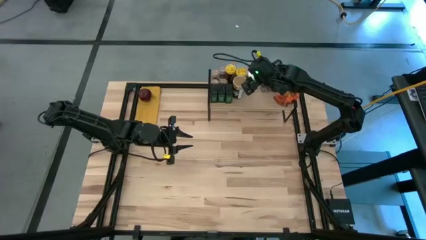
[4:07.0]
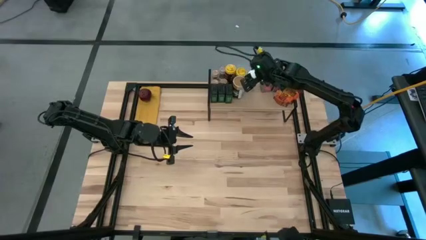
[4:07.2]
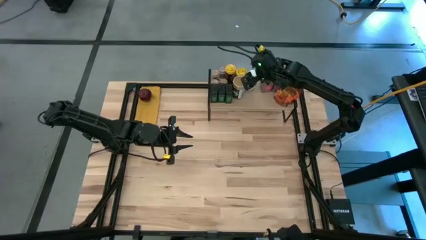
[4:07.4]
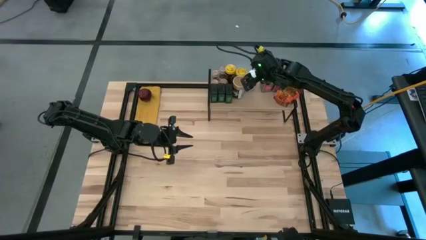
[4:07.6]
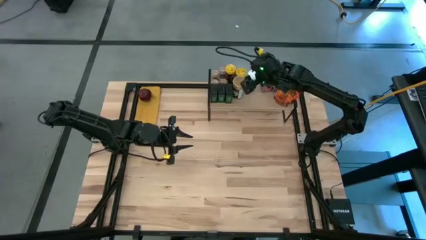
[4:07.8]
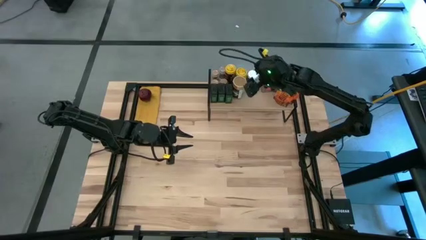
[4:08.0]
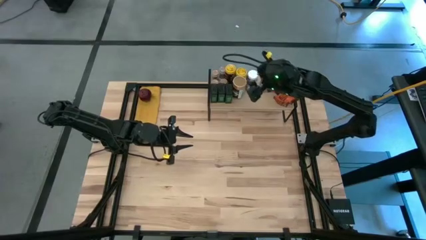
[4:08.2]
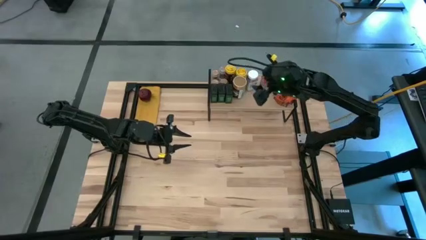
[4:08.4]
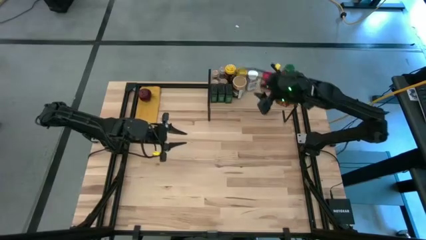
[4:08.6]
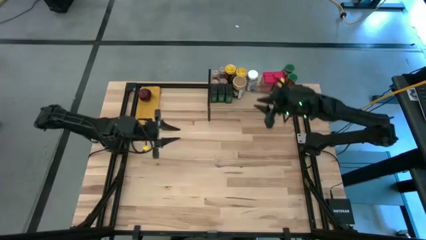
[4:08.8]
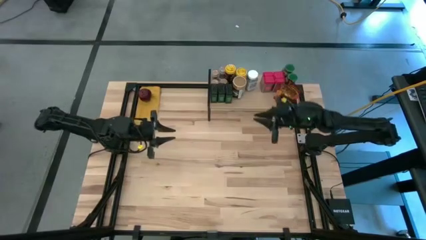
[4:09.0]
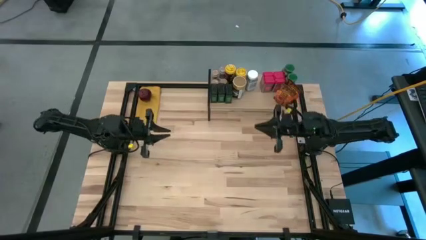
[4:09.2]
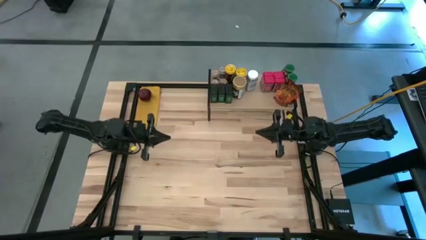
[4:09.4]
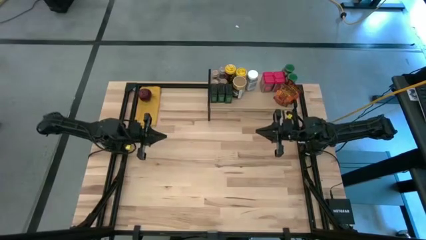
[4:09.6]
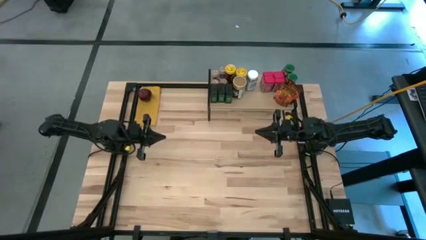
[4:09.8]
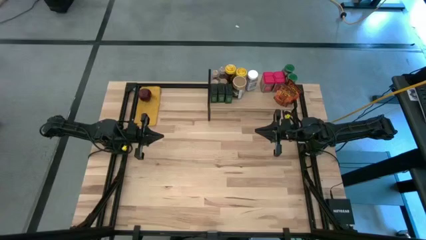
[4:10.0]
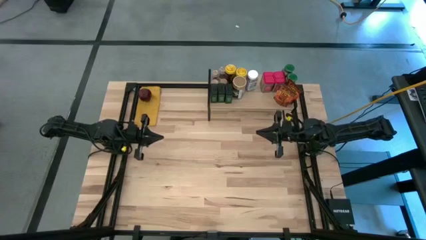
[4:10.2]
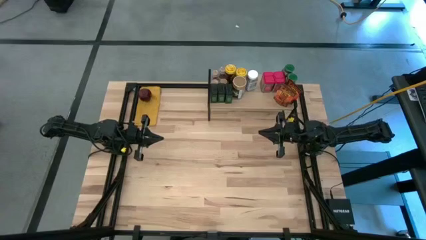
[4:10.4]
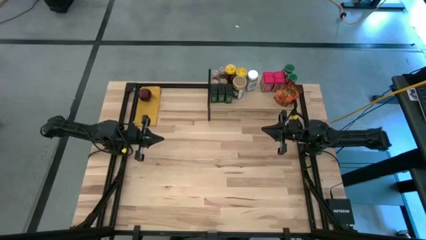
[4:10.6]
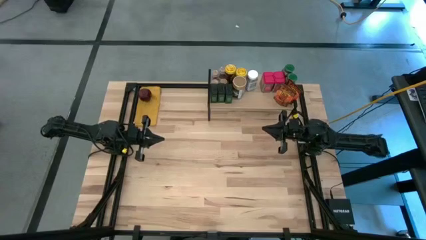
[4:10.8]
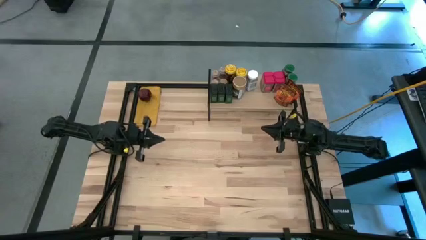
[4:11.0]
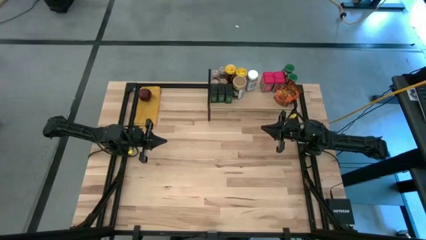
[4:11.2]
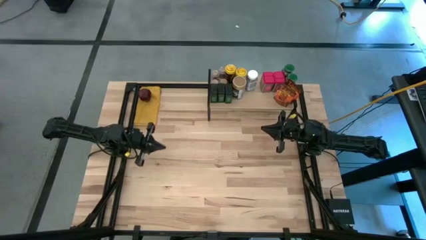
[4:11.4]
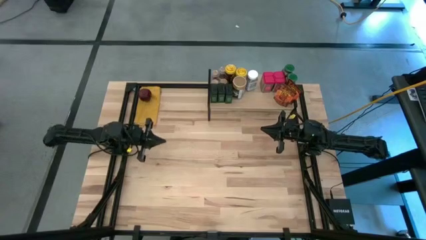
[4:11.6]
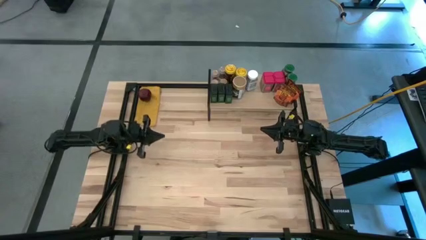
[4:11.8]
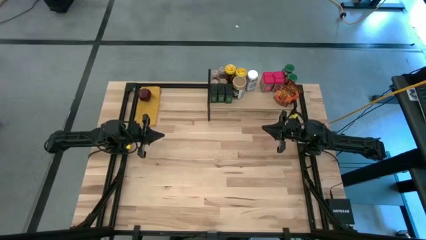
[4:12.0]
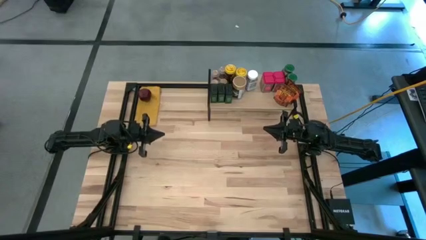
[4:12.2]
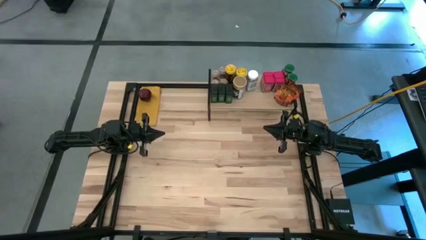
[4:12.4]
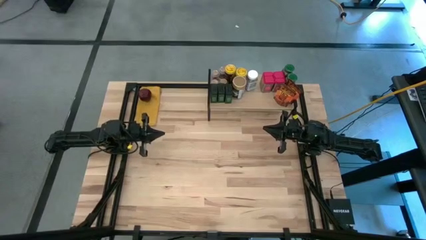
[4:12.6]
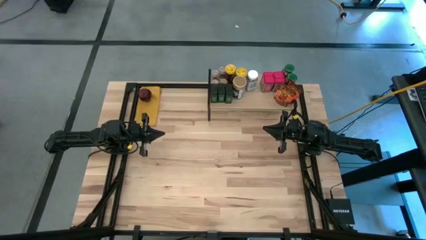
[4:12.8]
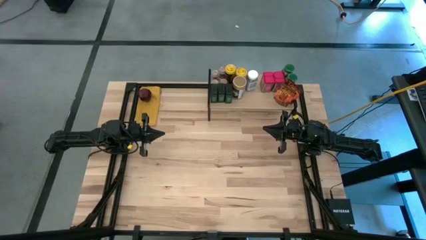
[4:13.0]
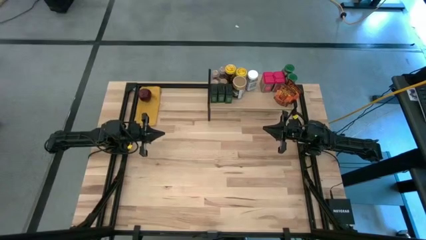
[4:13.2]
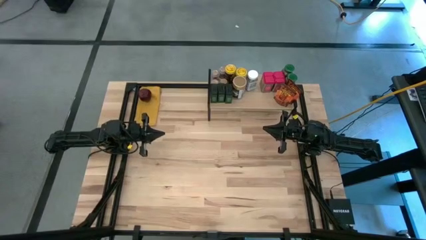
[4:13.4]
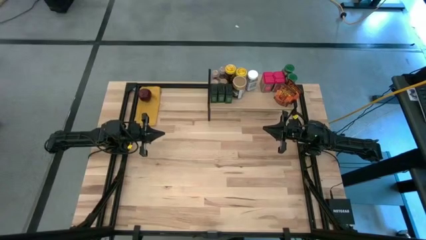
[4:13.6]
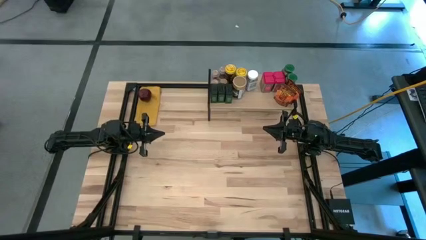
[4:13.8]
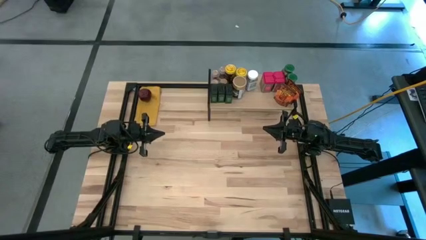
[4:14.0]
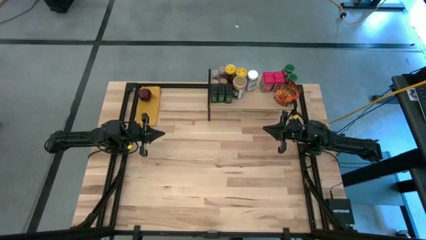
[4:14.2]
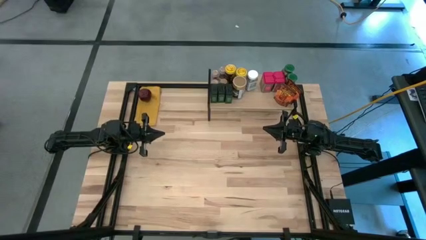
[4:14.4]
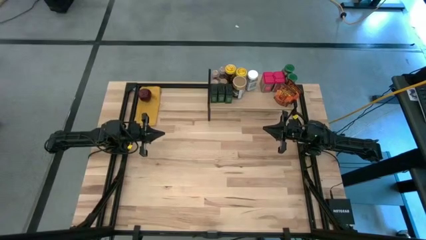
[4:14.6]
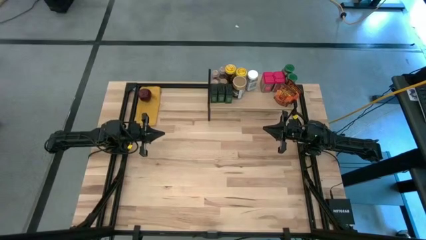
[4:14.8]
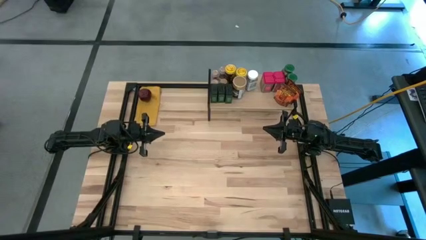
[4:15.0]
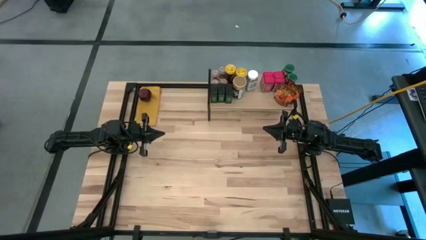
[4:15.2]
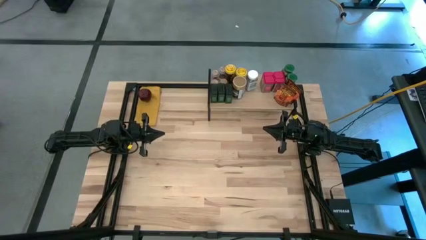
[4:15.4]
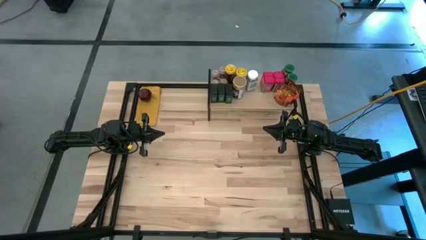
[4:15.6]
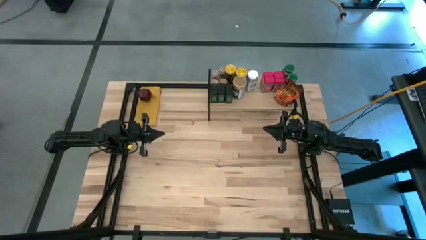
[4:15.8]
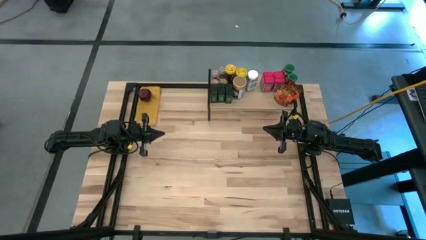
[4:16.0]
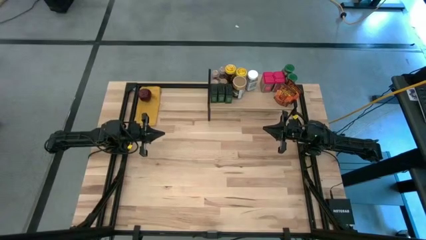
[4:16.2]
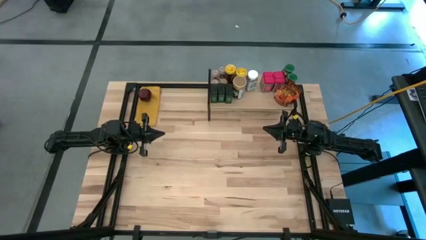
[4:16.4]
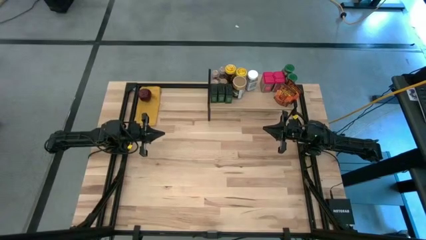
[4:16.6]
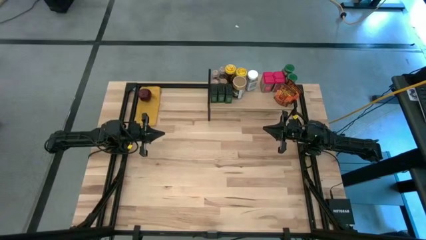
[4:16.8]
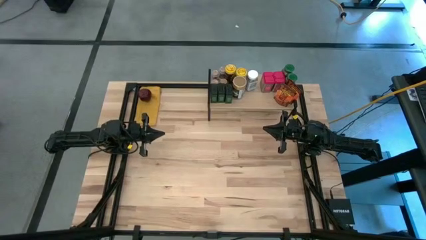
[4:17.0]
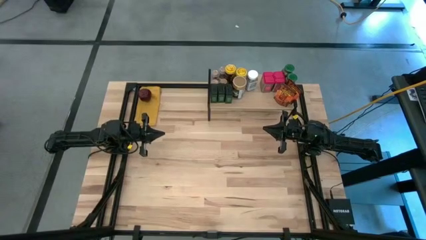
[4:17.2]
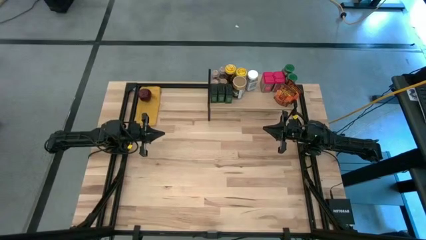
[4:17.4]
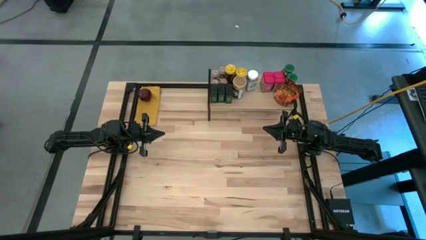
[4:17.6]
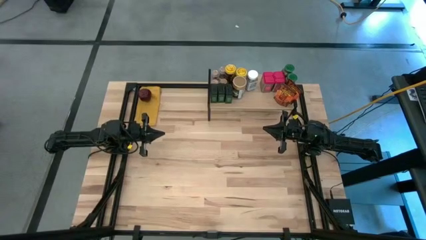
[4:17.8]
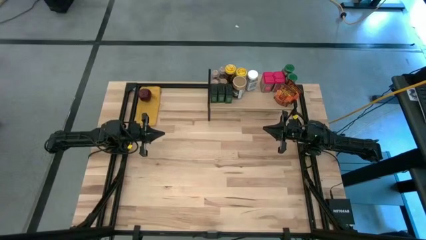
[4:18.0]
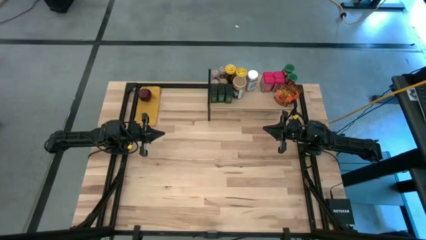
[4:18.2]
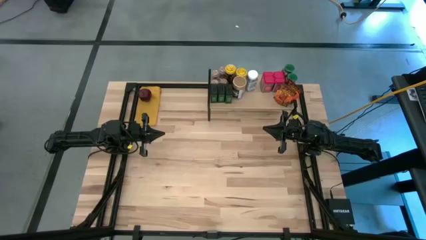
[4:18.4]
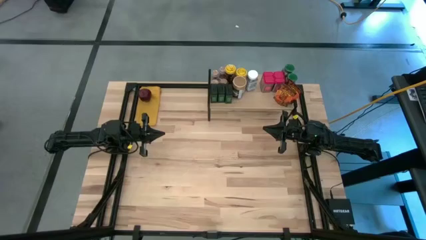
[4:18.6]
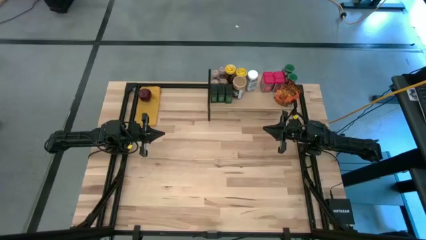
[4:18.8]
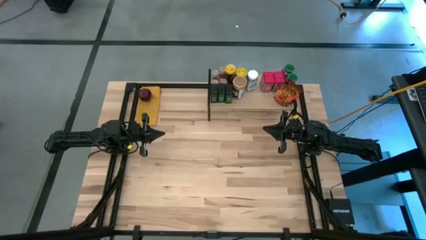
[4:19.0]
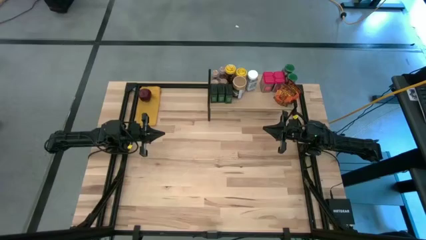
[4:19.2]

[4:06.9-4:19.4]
Task: Shelf spices
Return to Home Position
